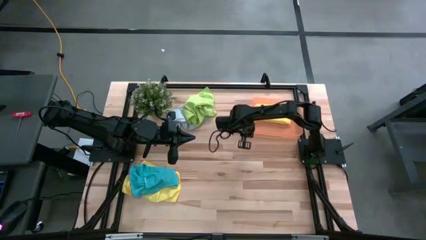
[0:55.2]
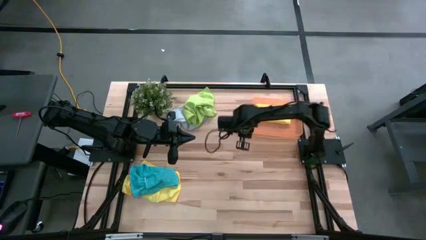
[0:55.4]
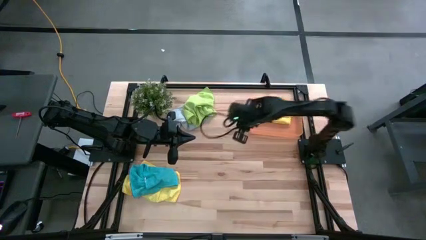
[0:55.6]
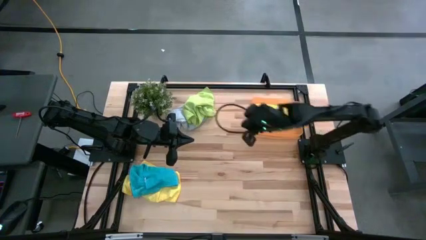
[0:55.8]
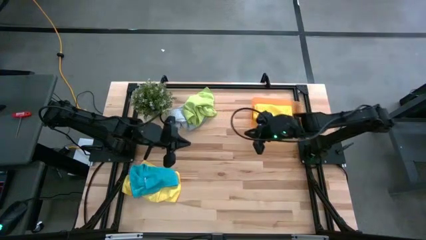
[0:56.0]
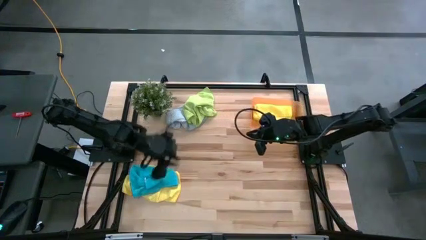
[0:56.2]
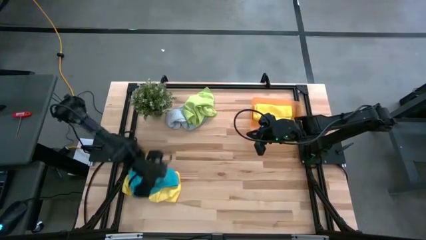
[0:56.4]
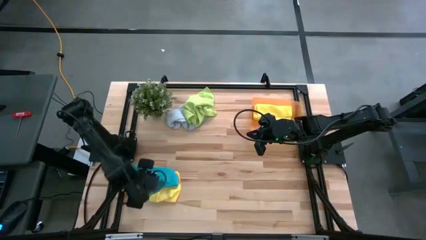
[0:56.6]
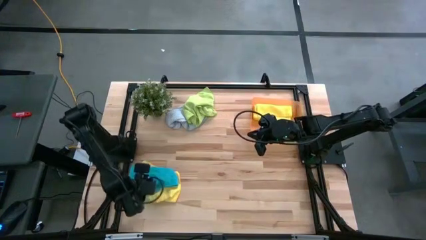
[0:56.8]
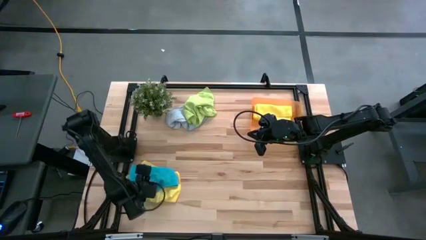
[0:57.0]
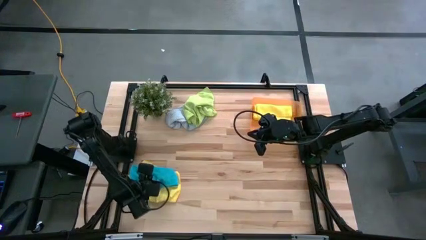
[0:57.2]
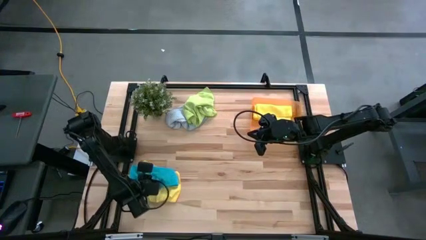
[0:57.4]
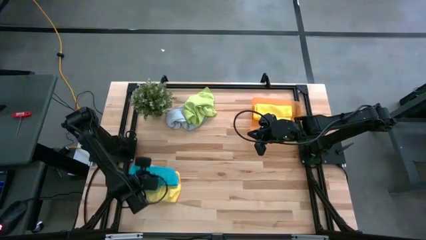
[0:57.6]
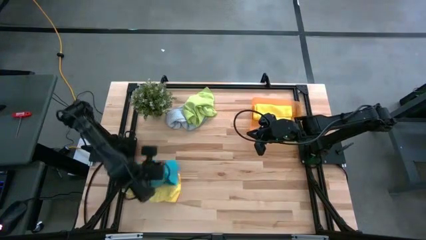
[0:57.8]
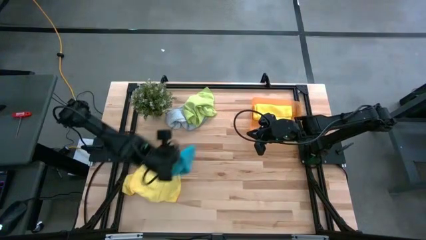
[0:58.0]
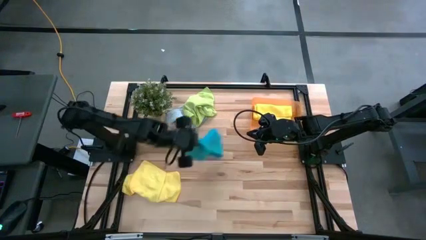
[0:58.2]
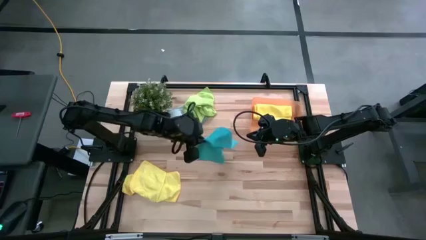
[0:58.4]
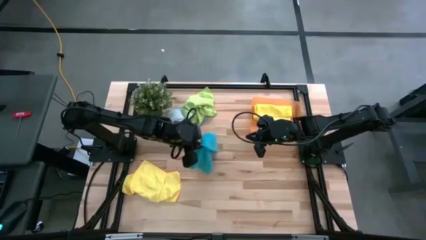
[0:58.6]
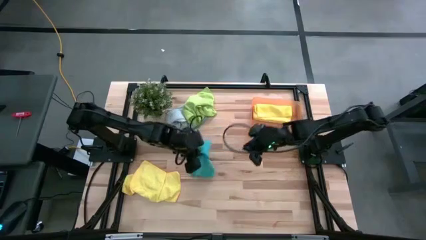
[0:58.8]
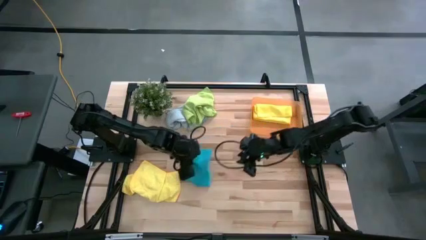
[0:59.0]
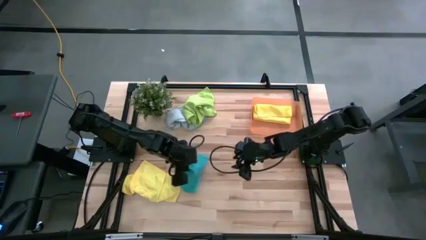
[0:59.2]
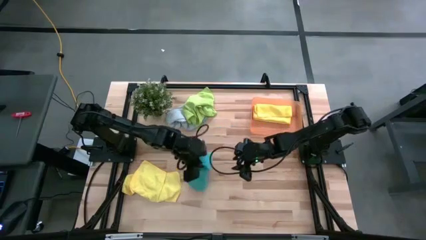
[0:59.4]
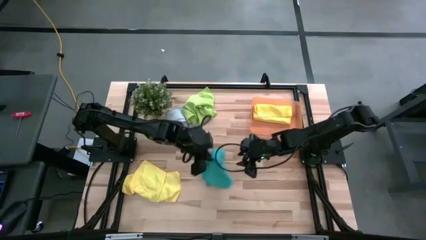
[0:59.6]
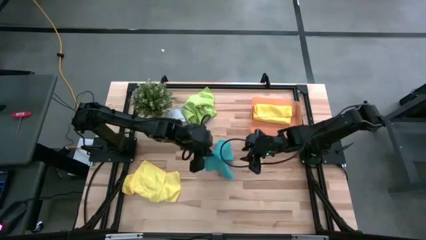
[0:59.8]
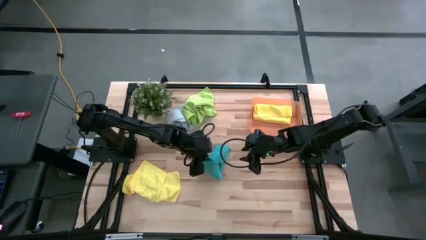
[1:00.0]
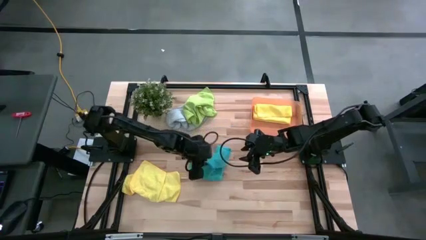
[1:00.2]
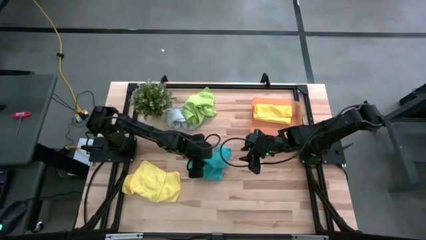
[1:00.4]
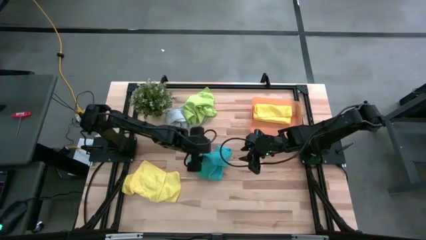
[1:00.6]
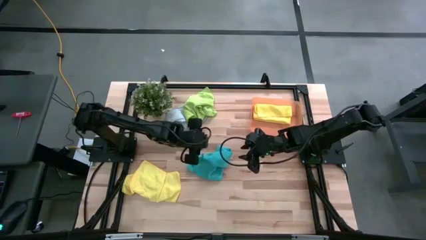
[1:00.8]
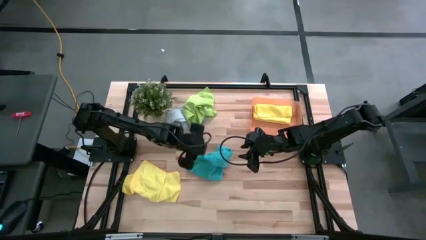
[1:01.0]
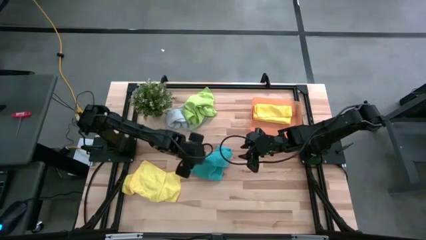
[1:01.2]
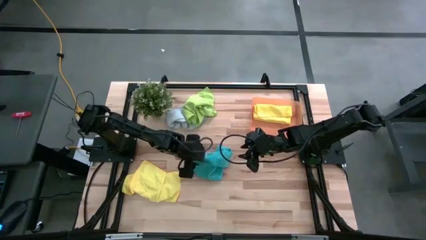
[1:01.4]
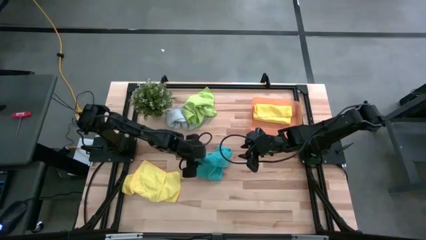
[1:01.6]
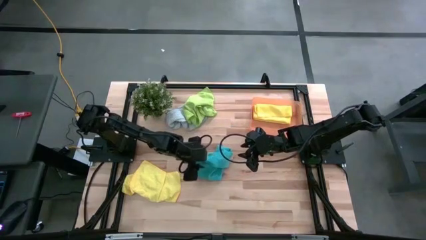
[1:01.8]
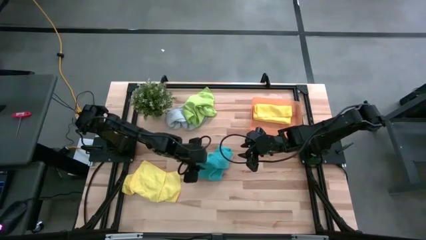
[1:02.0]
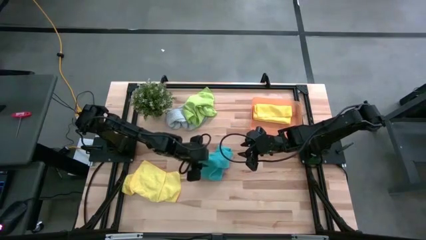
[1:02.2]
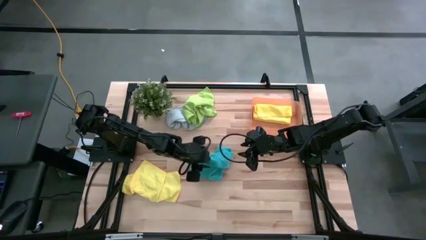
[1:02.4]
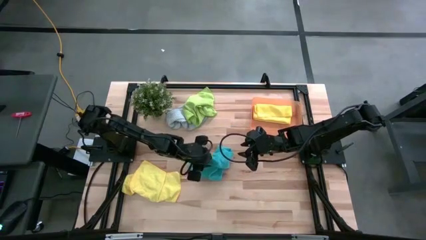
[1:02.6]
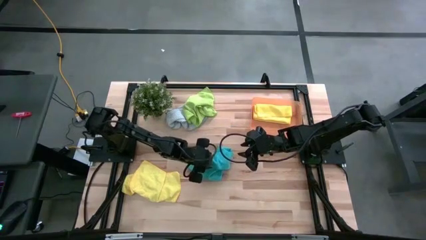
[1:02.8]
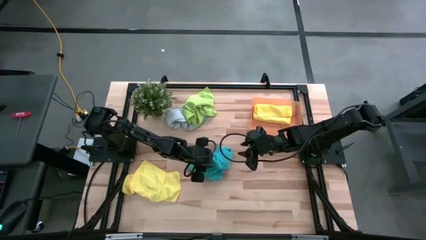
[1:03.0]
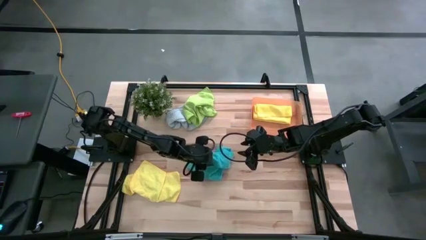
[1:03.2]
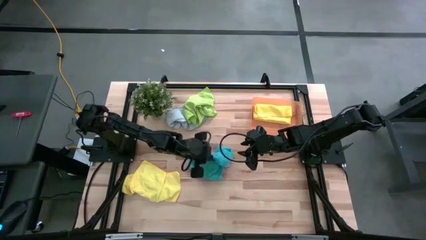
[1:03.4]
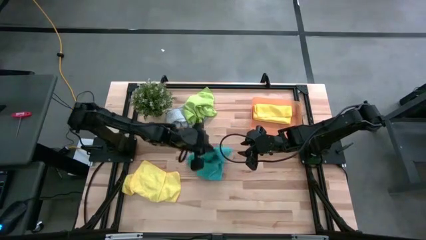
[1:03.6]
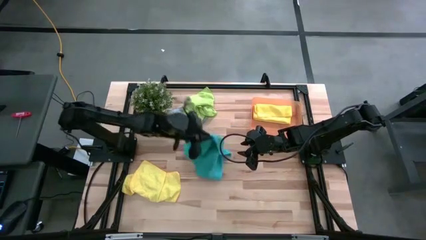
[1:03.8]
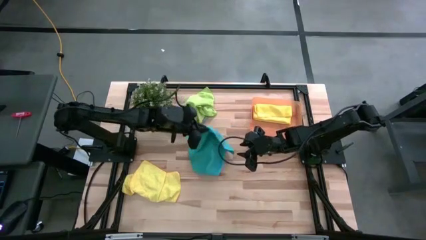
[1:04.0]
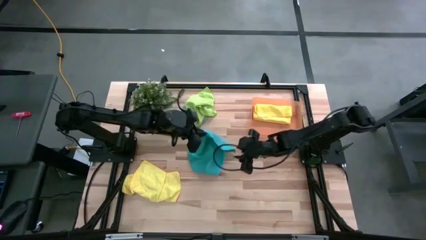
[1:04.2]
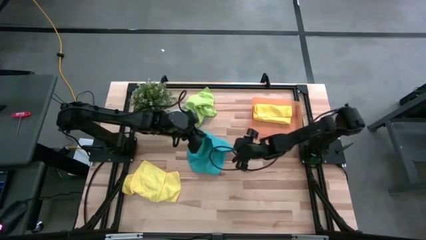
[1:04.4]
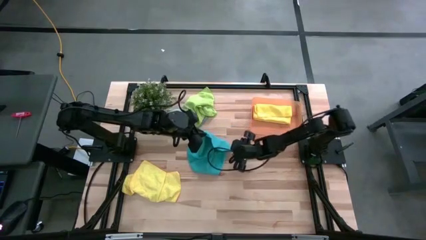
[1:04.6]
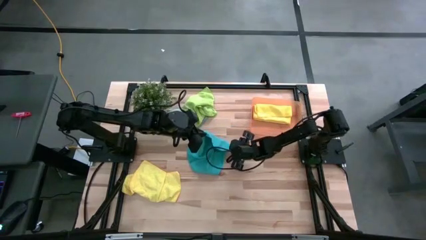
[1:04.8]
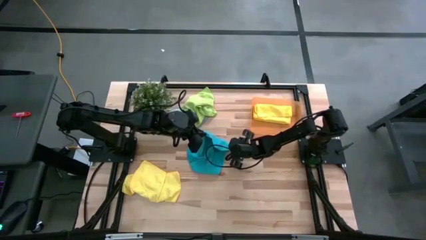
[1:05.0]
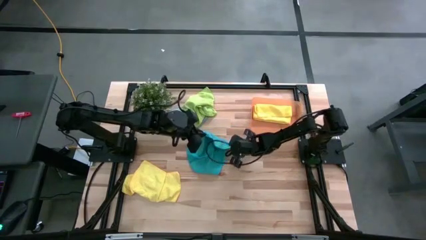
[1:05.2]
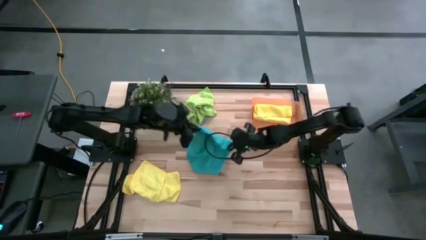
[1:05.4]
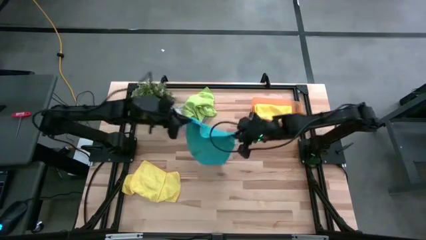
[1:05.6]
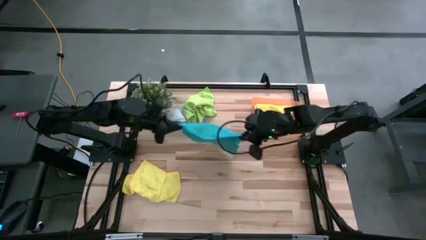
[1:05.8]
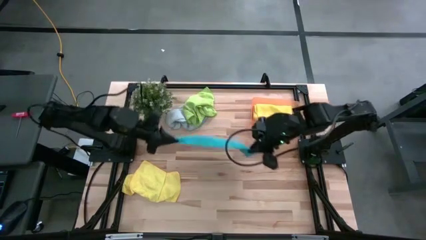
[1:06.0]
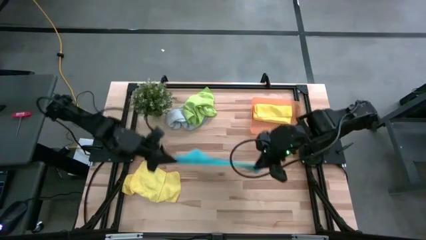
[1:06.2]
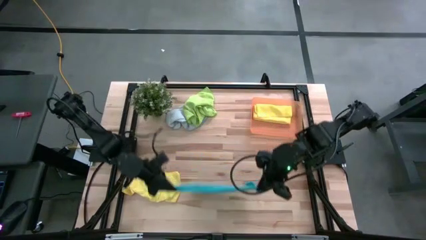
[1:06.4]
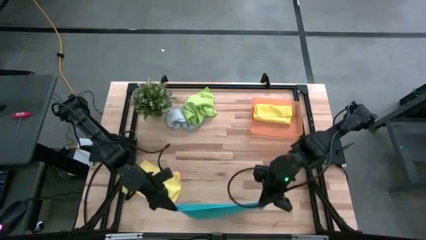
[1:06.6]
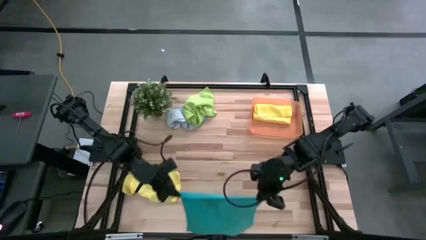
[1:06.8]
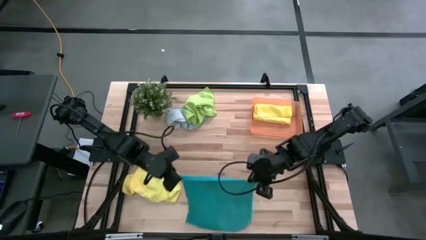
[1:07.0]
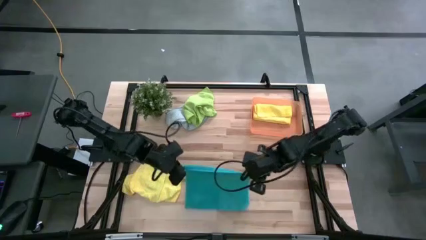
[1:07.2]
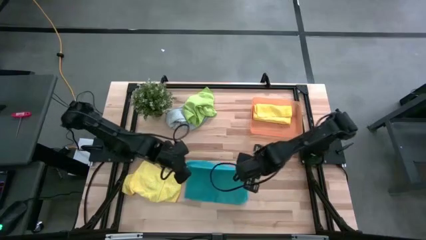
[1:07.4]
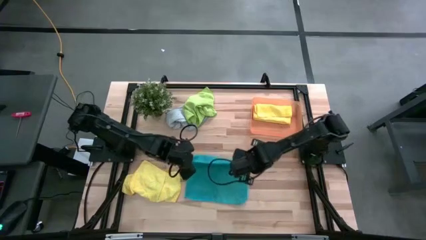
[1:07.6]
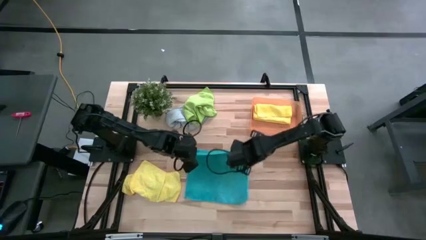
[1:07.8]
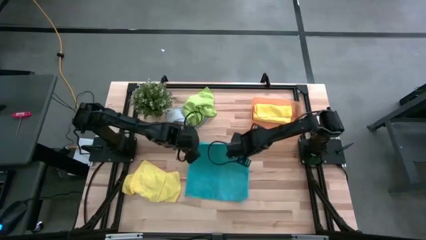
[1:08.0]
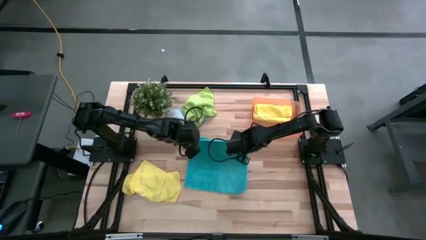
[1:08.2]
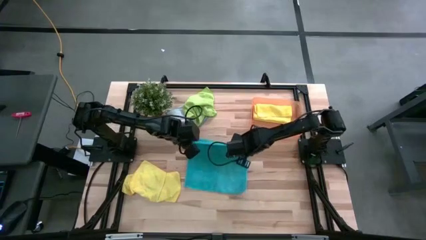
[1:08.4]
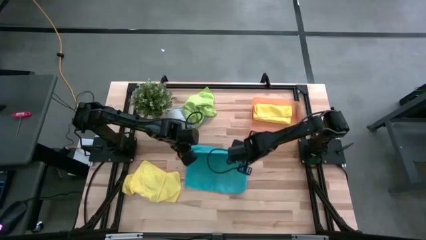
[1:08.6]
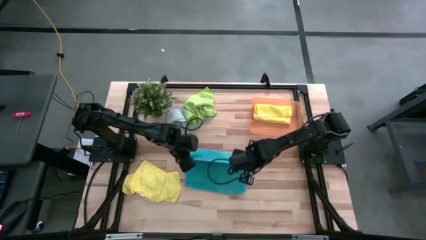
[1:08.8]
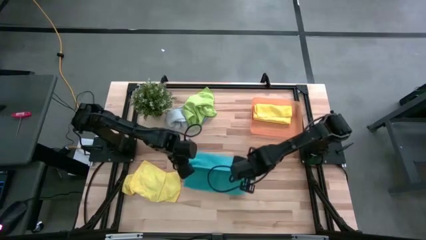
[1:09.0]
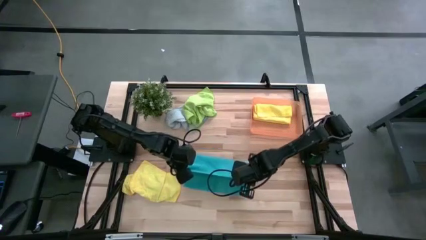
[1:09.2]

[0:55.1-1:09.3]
Task: Fold microfiber towels
Fold the blue microfiber cloth

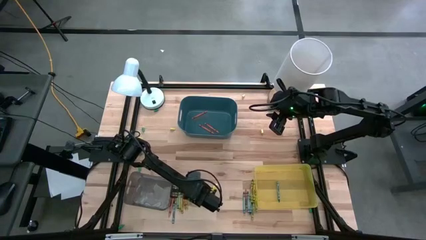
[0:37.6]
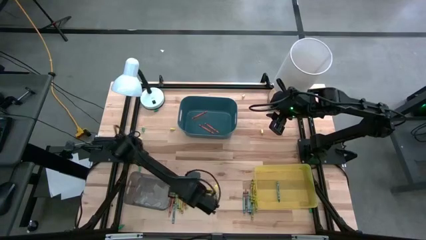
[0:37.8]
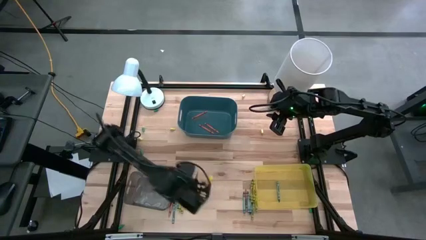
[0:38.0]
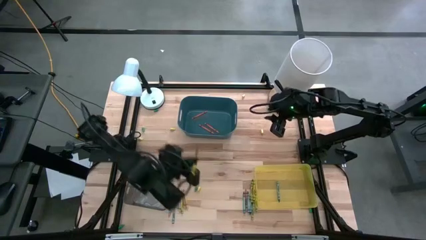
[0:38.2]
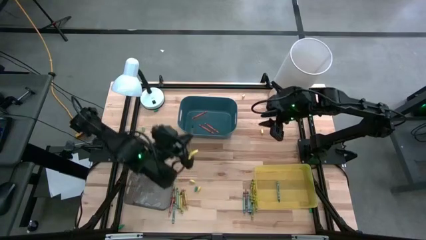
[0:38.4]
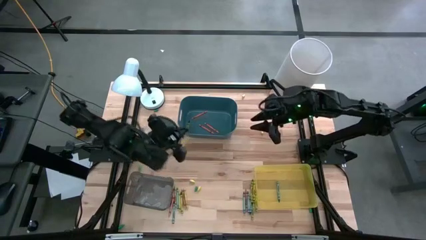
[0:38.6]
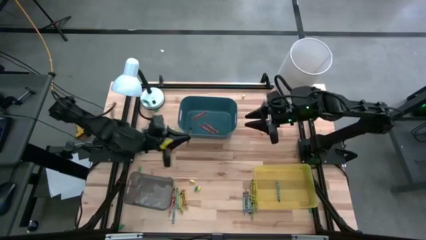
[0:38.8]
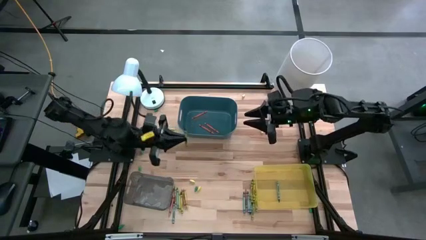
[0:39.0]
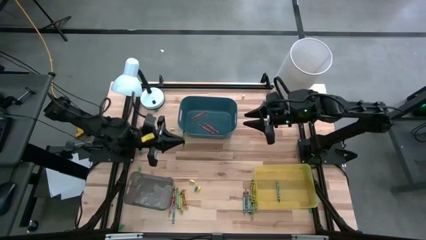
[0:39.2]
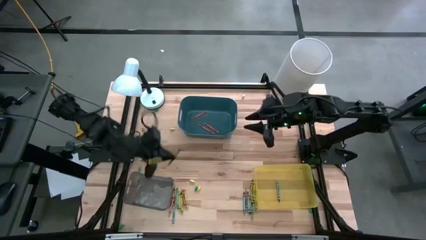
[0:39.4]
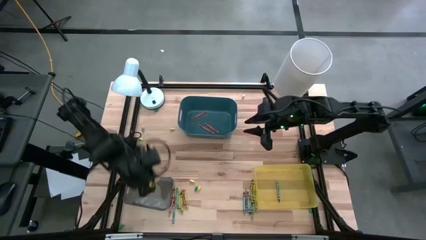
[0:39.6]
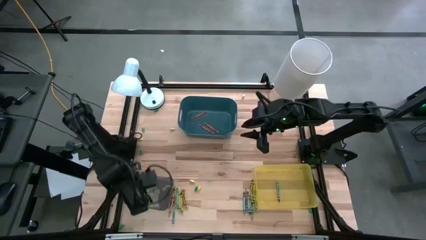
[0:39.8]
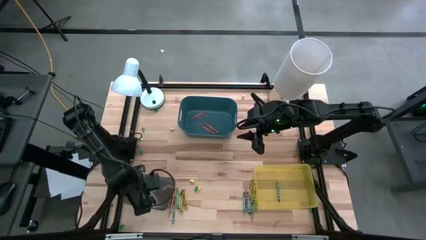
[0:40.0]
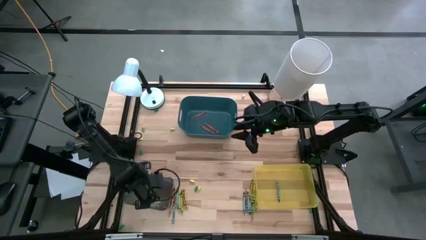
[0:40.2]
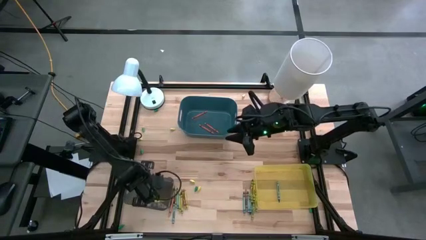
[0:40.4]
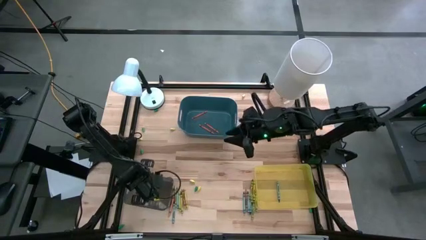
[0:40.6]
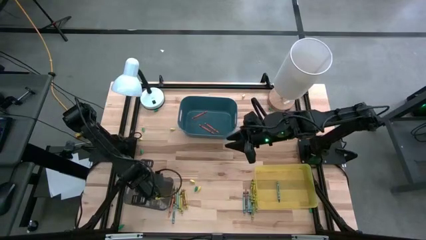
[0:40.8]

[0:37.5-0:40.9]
Task: Sort crayons
Put the yellow crayon into the gray bin
